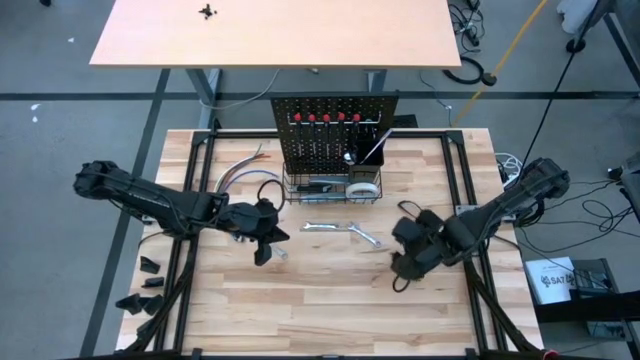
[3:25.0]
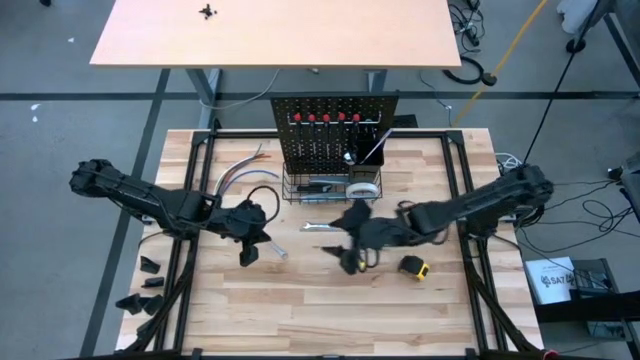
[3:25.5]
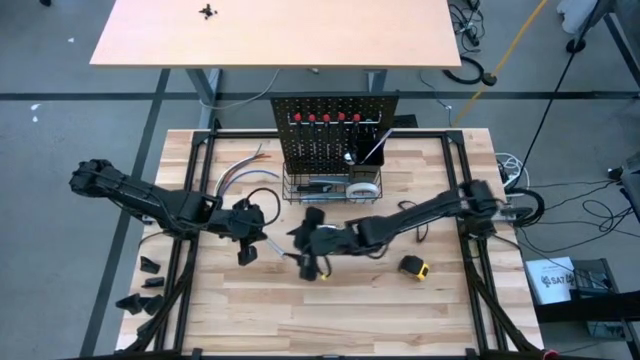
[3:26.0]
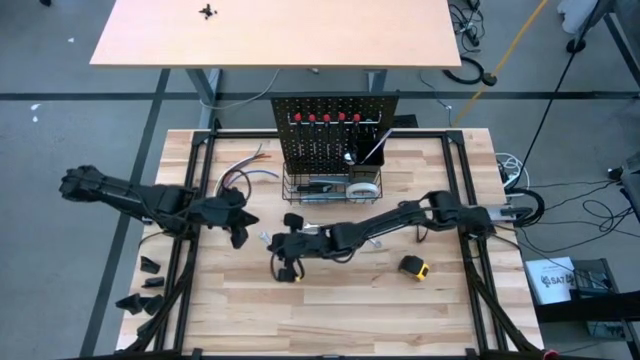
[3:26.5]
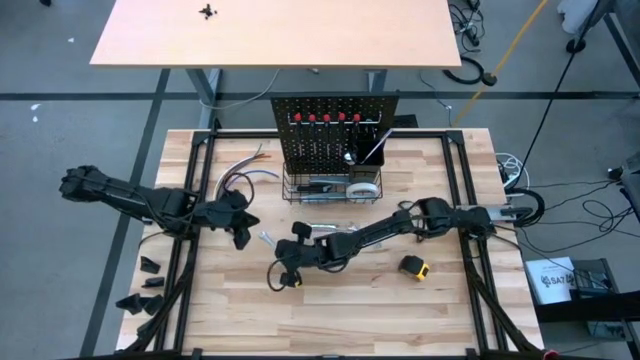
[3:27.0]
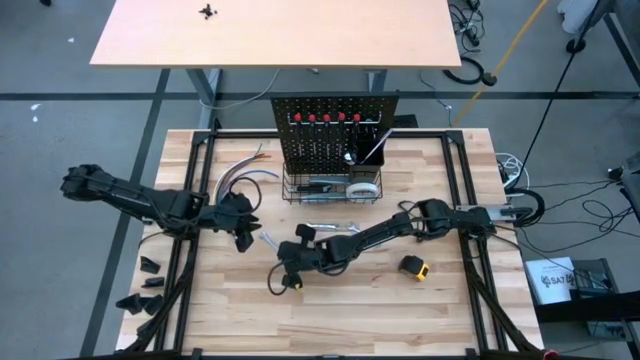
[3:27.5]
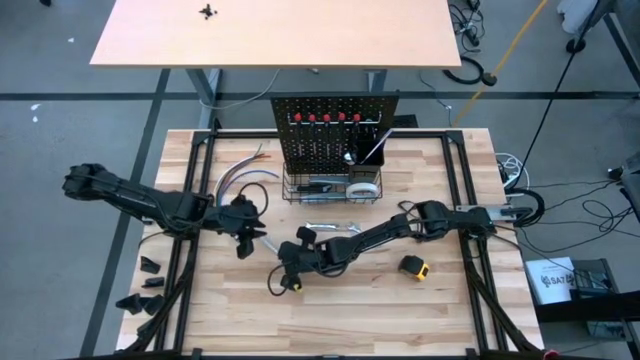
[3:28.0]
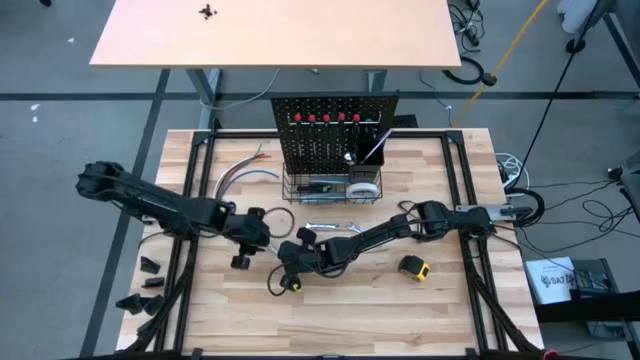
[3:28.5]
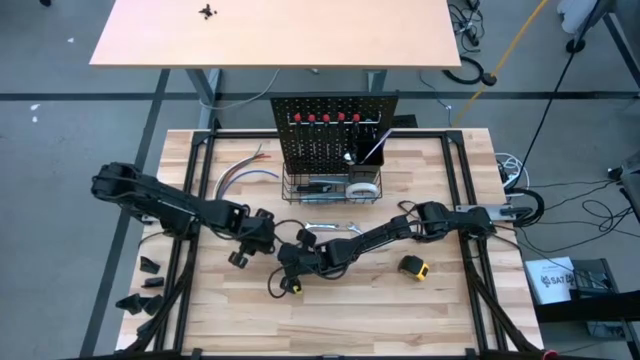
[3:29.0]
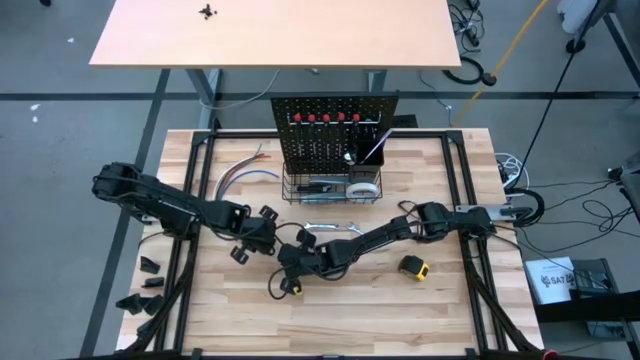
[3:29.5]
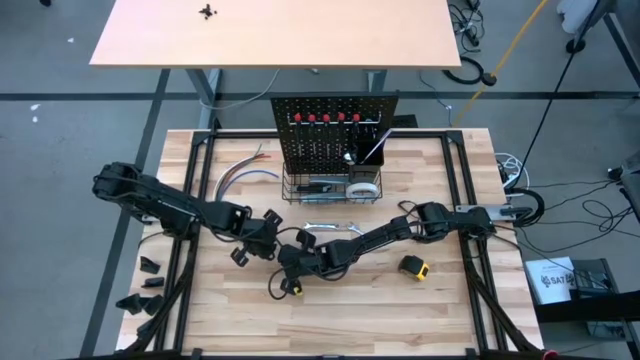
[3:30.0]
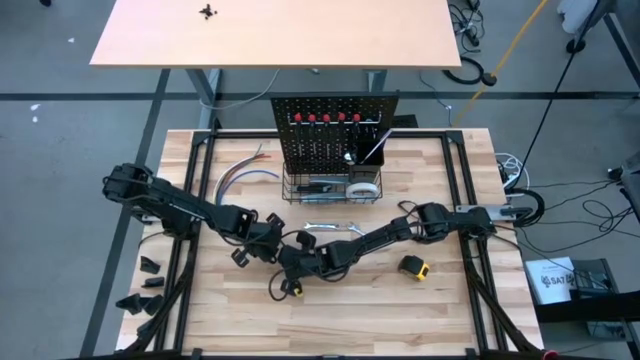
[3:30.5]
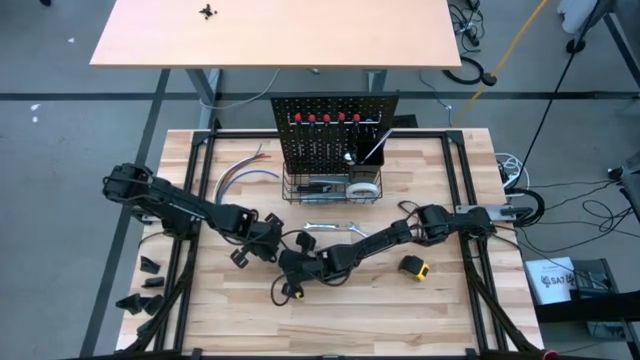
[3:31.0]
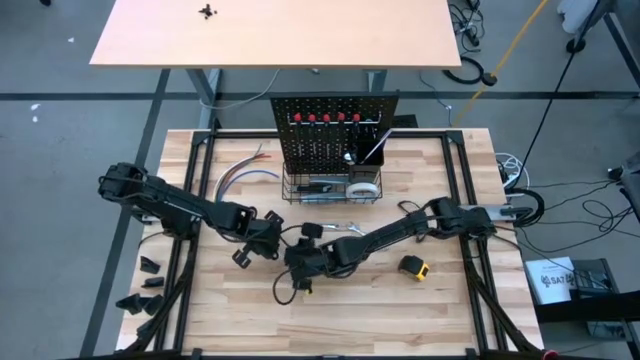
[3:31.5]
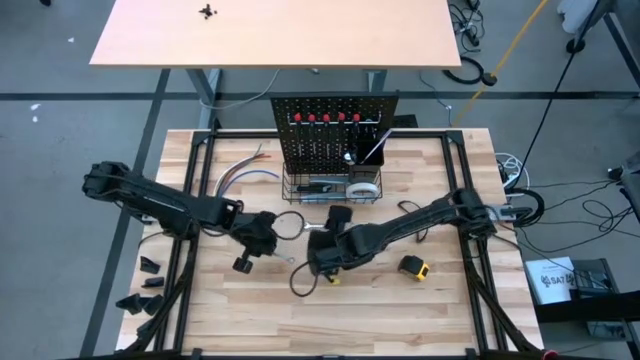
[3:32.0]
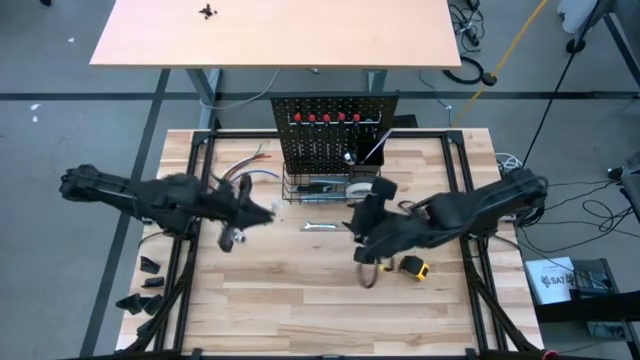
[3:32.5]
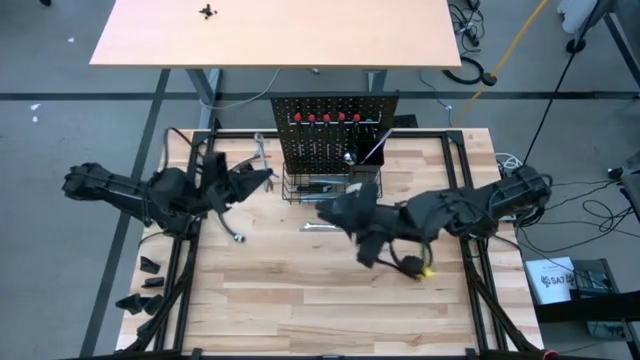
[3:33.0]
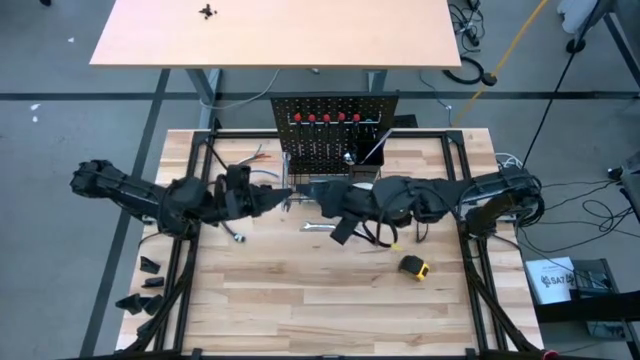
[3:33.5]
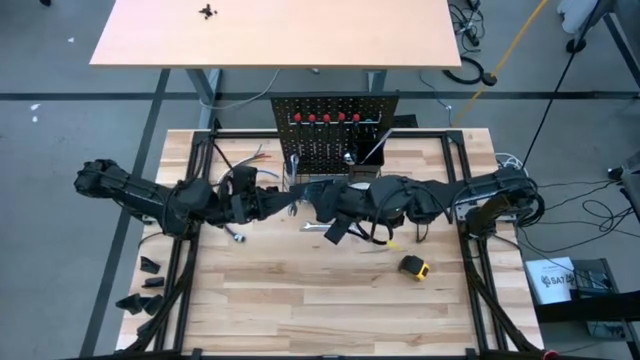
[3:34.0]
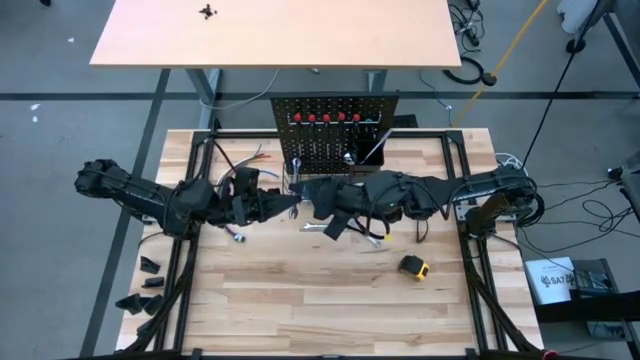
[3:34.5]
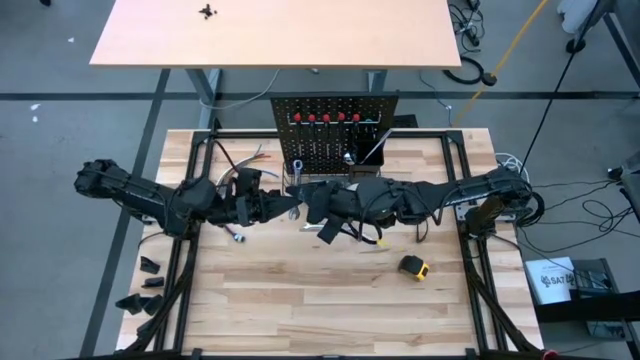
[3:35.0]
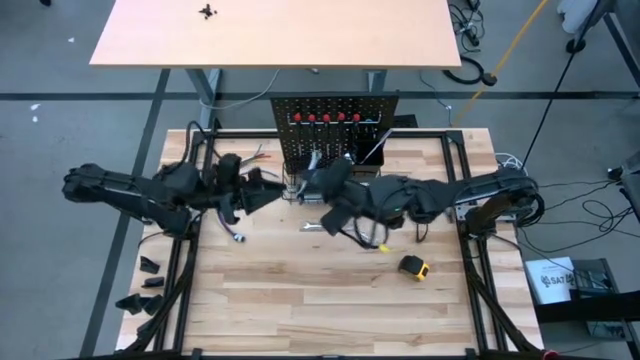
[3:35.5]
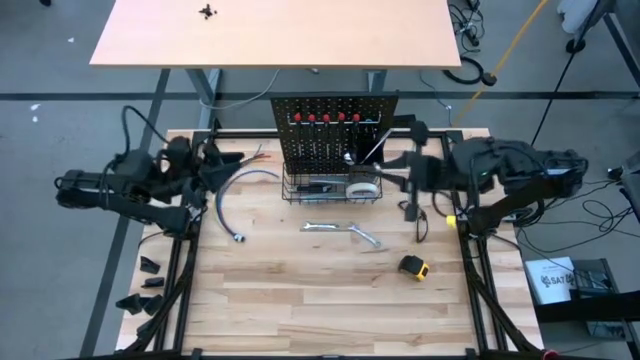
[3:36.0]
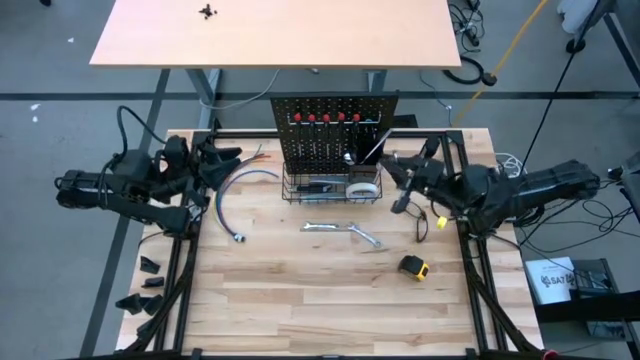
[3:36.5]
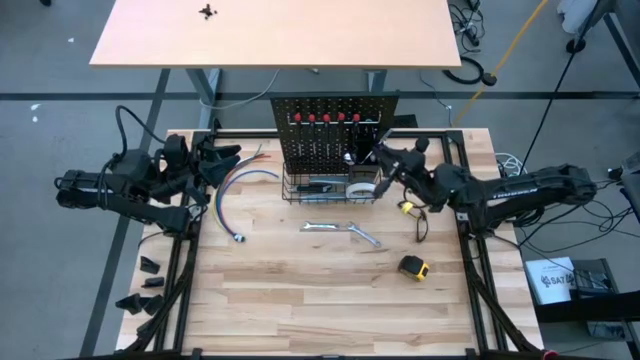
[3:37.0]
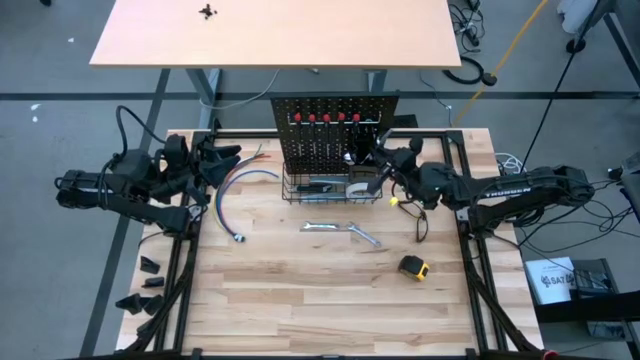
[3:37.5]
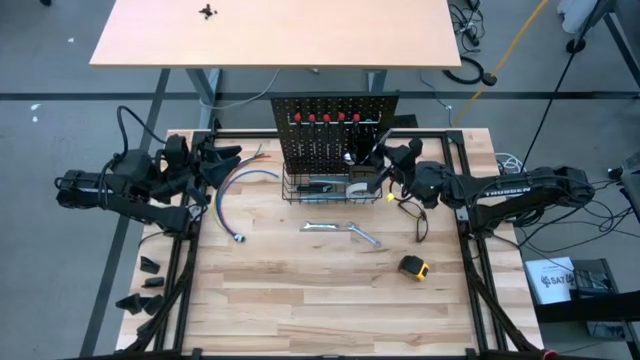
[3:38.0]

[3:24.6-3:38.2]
Task: Hang tools onto peg board
Put the wrench into the pegboard bin

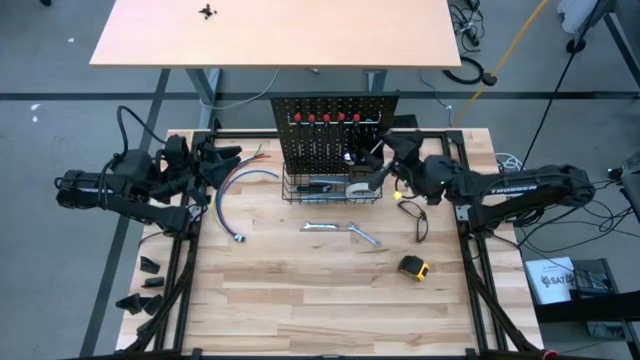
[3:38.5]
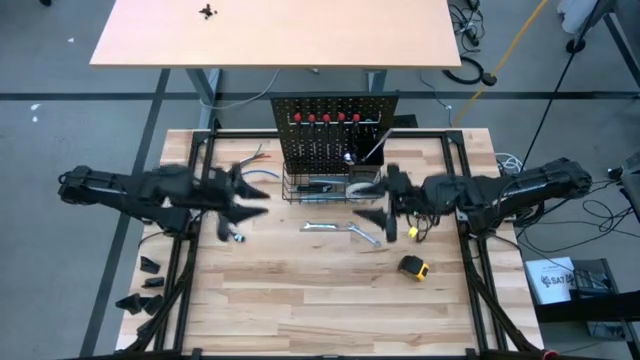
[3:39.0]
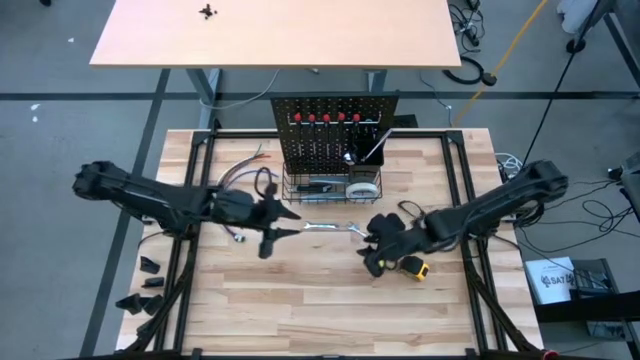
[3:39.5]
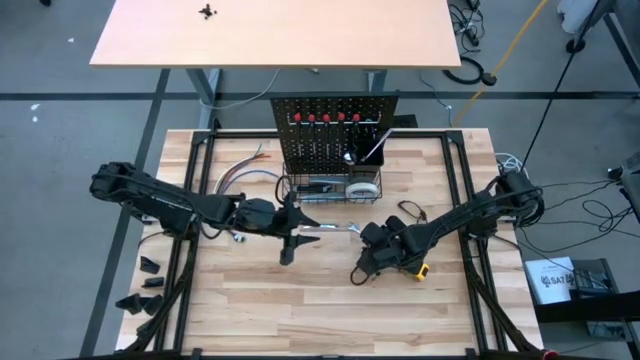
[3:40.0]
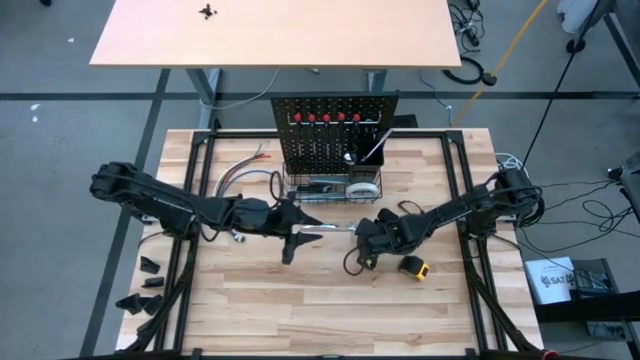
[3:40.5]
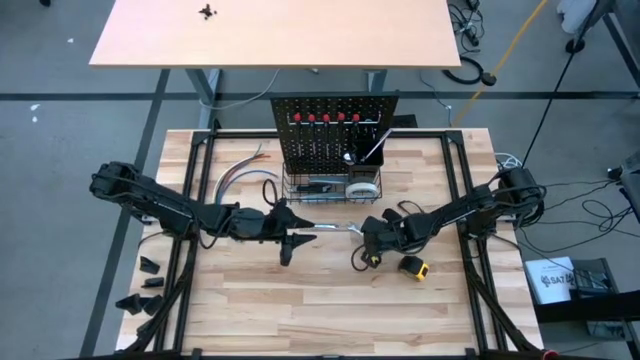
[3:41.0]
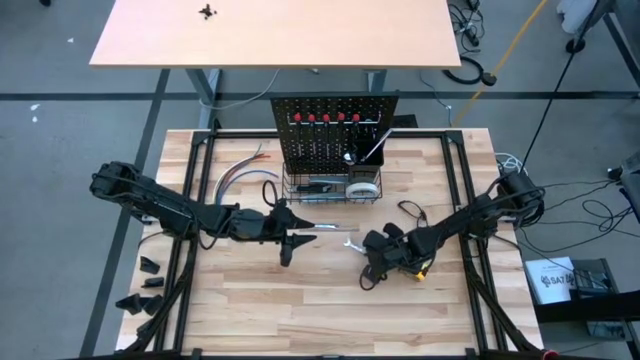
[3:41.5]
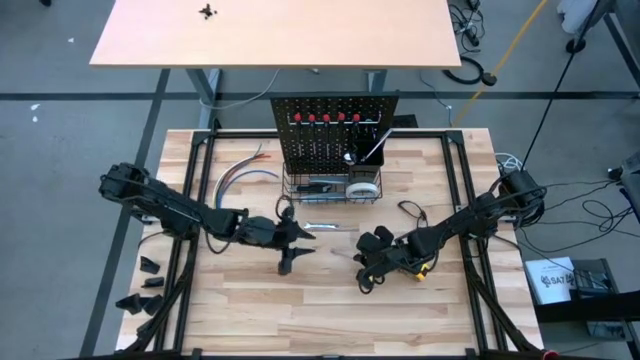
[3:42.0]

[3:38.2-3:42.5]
Put the wrench into the pegboard bin

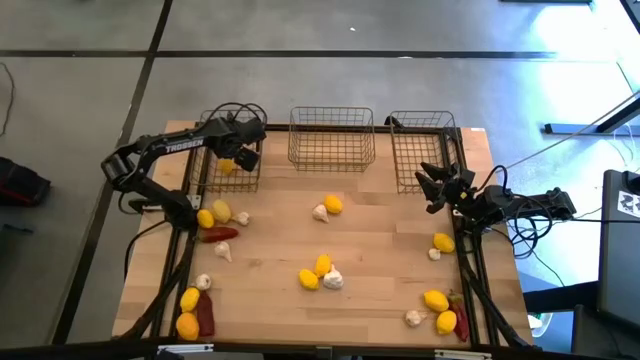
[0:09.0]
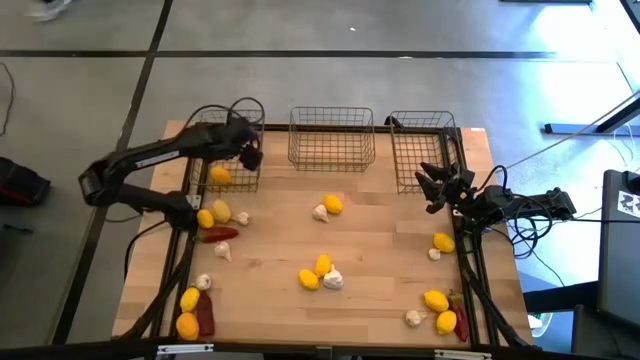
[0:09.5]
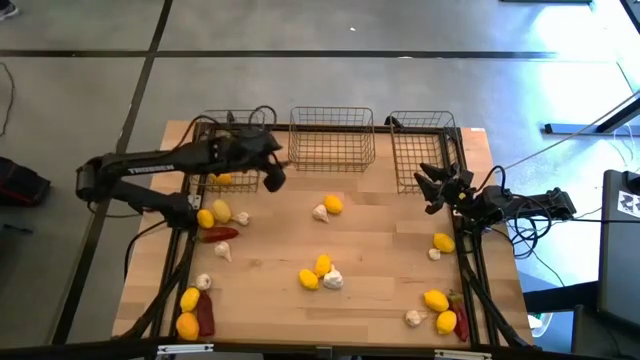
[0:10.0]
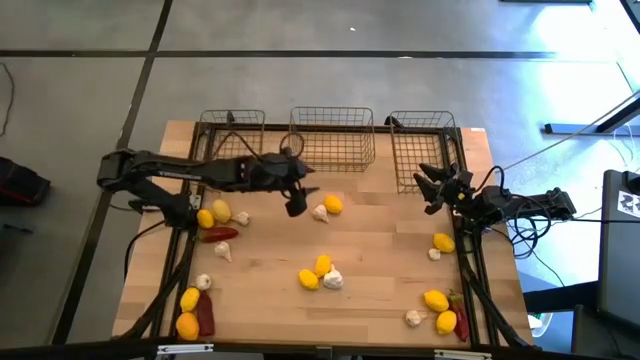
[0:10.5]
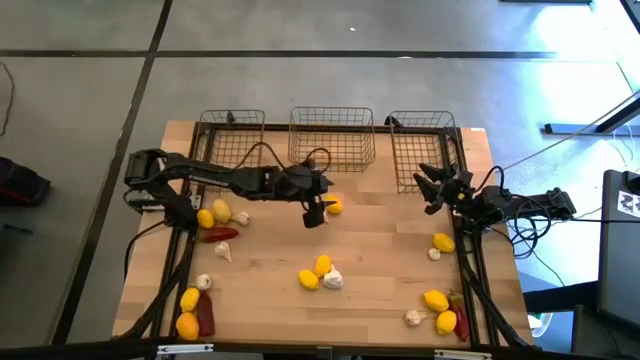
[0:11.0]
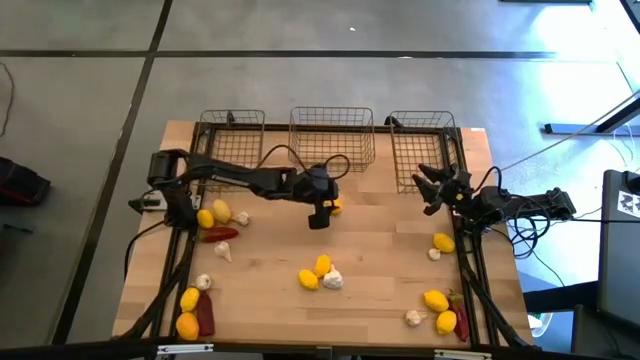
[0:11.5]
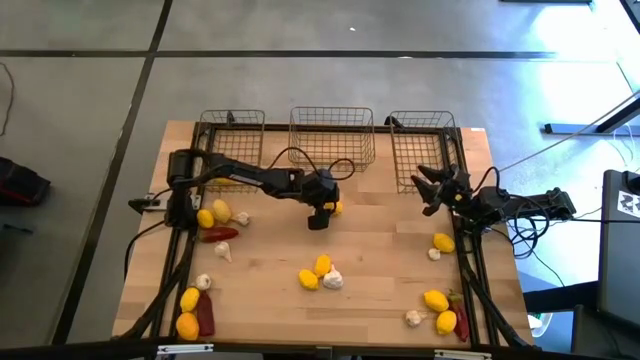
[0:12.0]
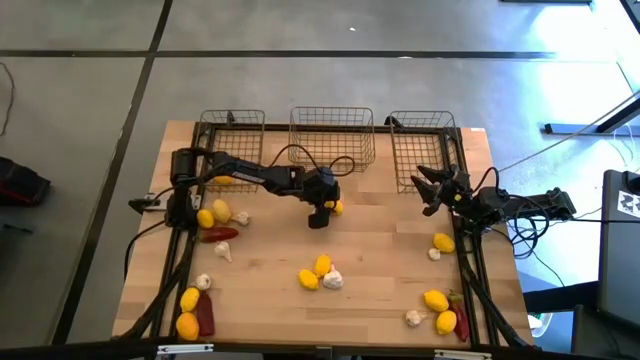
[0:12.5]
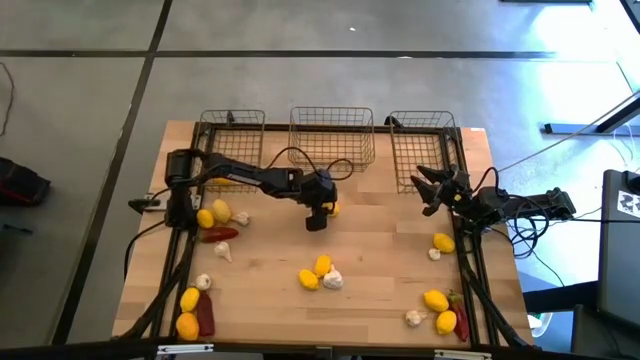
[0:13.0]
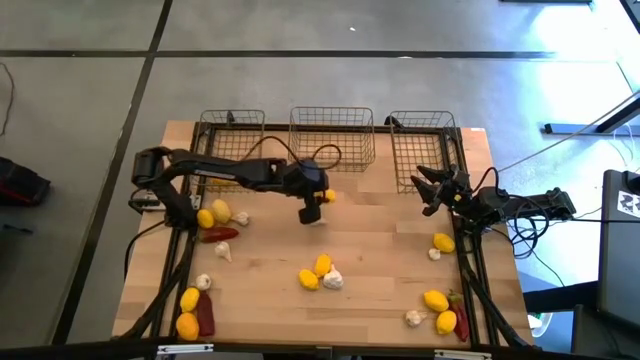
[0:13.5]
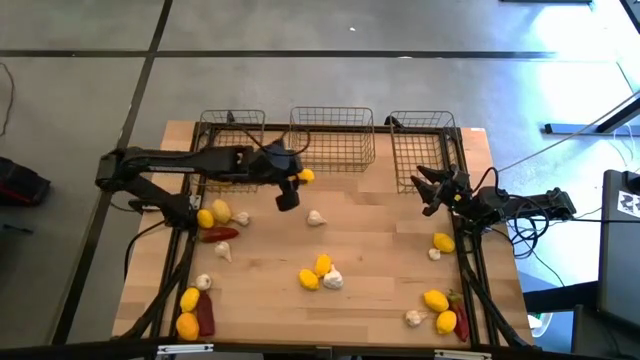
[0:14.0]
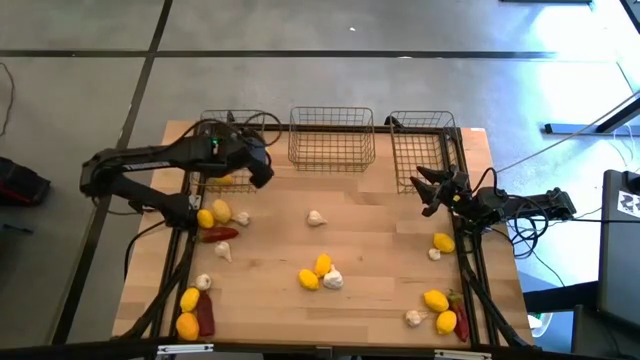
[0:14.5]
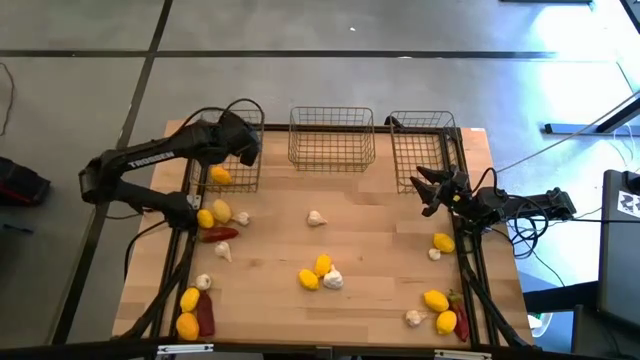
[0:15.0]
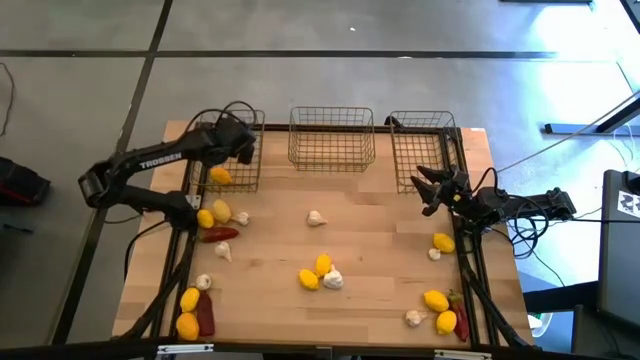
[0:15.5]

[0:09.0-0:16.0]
Task: Sort produce into baskets
Put the yellow lemon into the left gold wire basket
